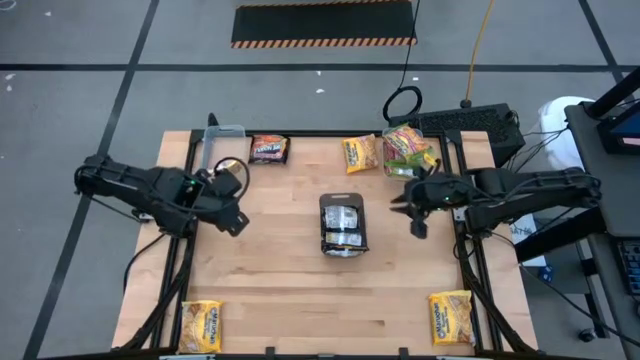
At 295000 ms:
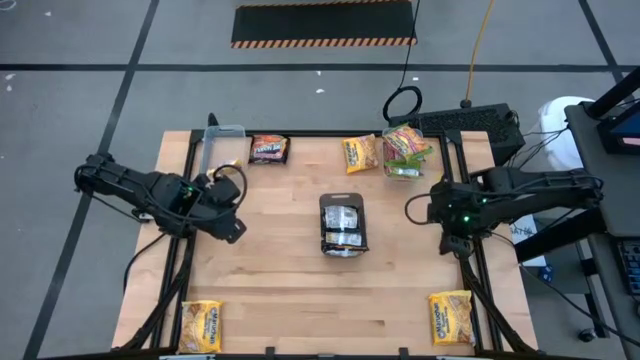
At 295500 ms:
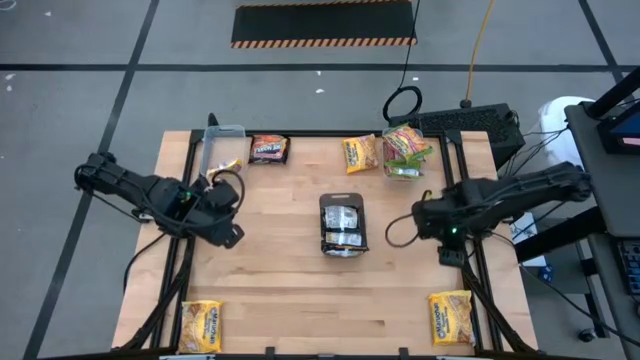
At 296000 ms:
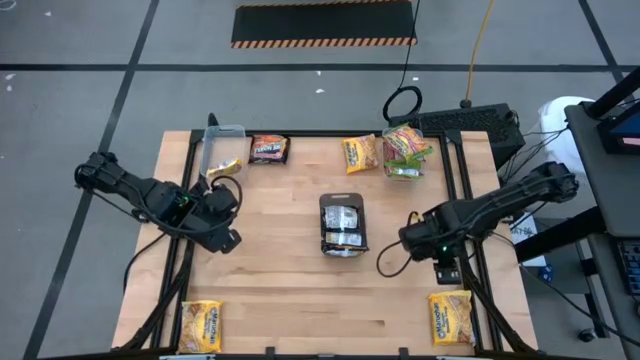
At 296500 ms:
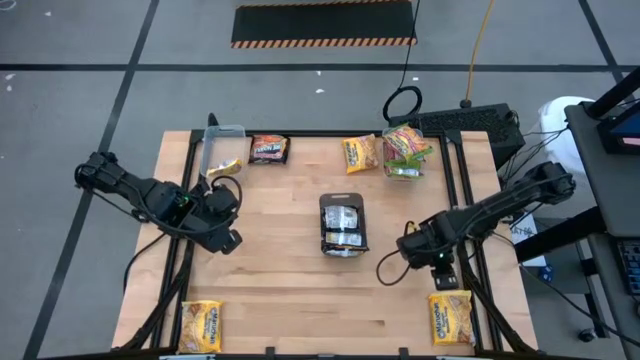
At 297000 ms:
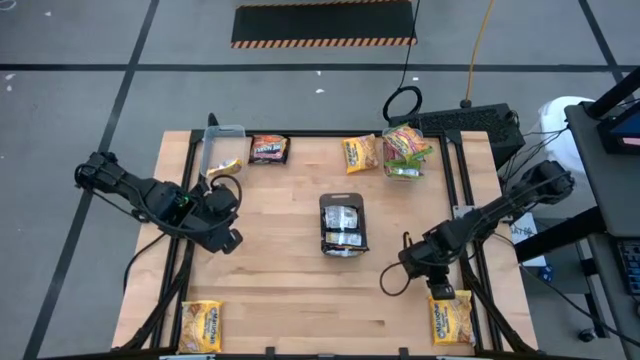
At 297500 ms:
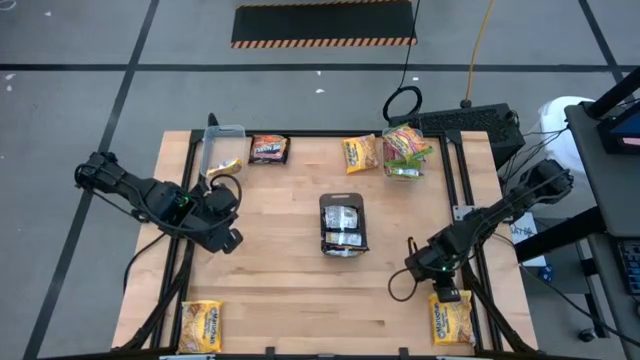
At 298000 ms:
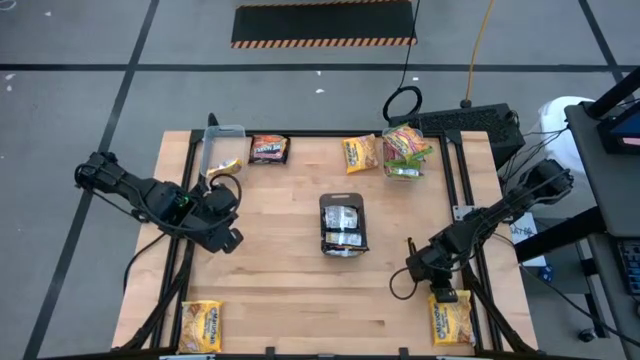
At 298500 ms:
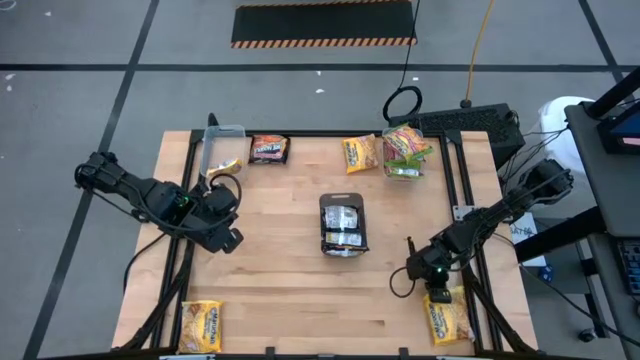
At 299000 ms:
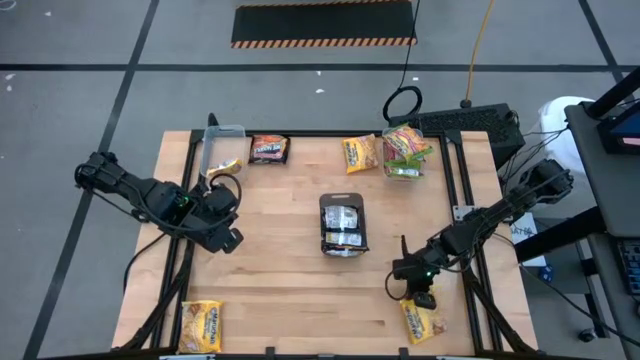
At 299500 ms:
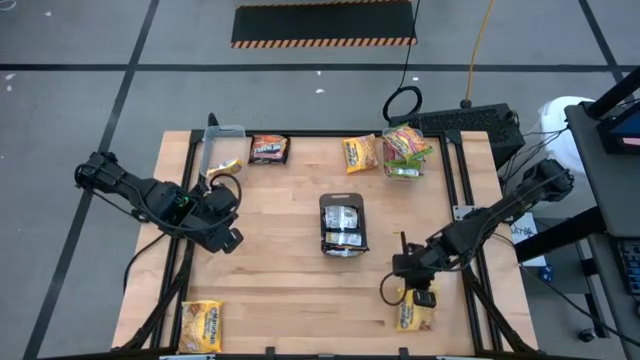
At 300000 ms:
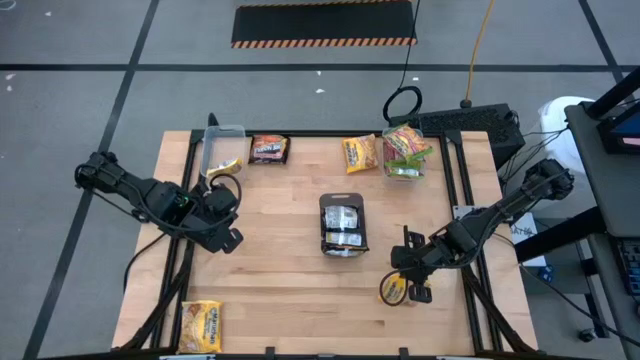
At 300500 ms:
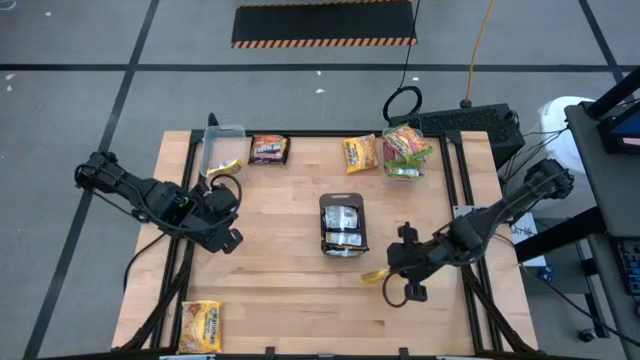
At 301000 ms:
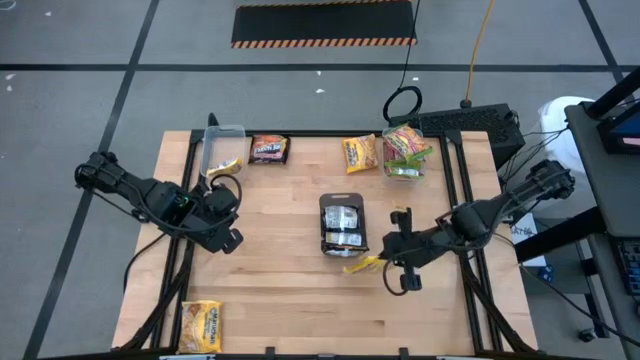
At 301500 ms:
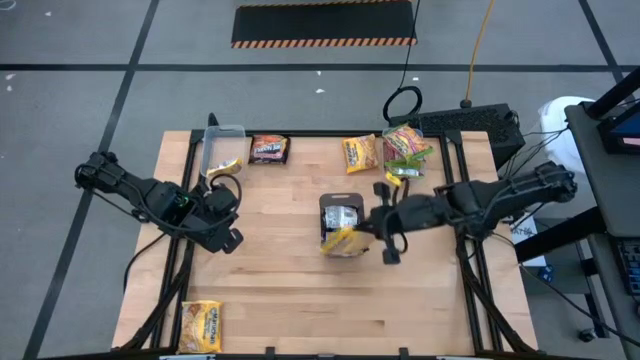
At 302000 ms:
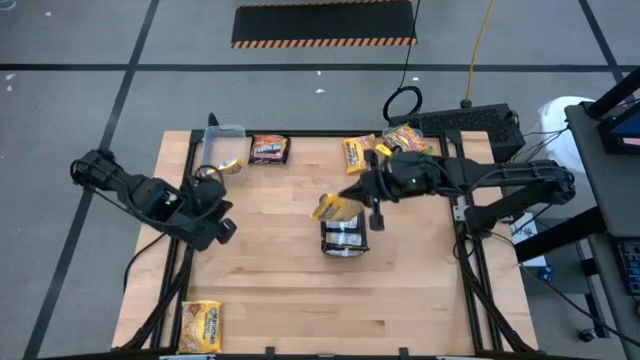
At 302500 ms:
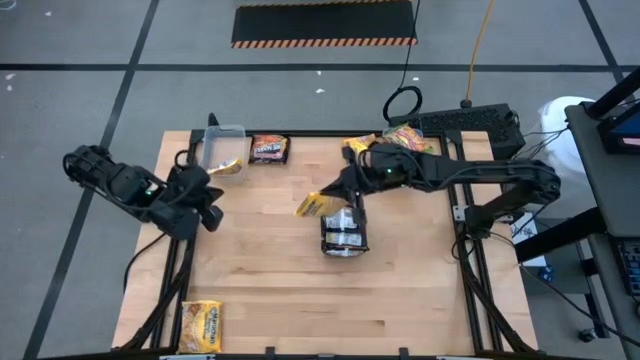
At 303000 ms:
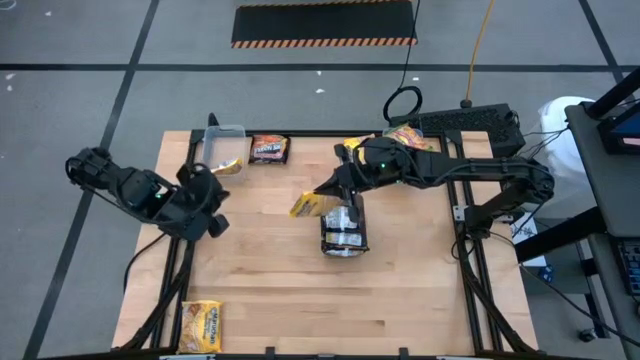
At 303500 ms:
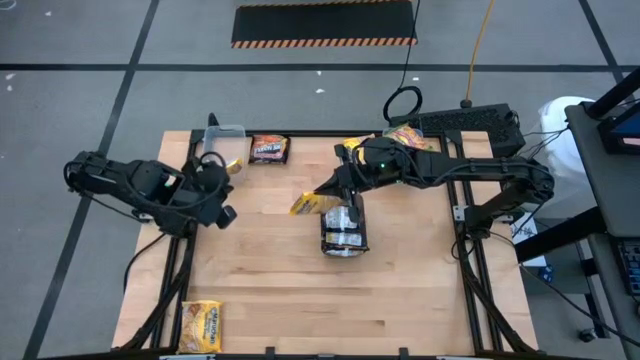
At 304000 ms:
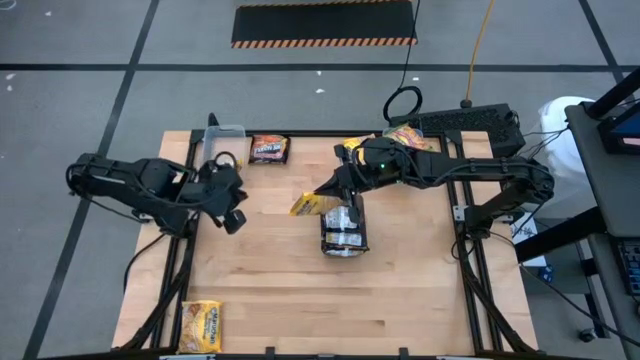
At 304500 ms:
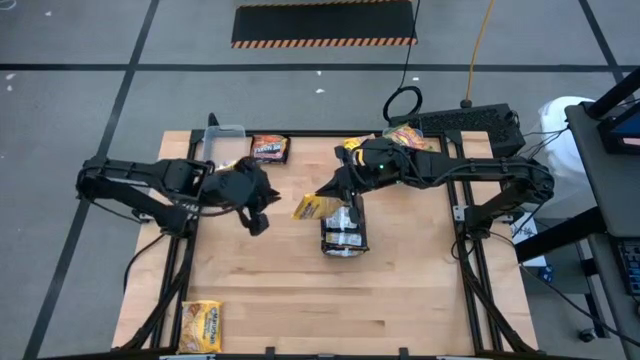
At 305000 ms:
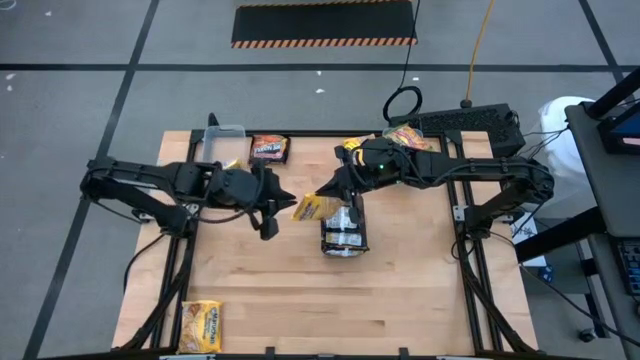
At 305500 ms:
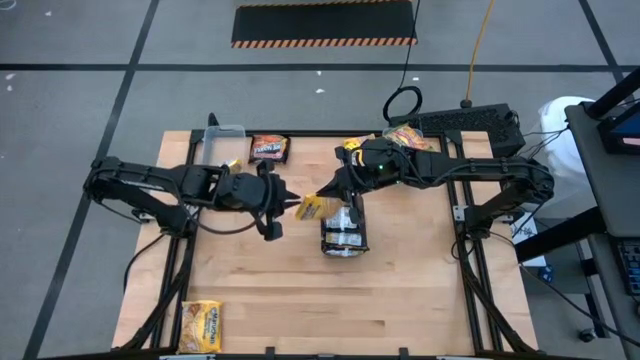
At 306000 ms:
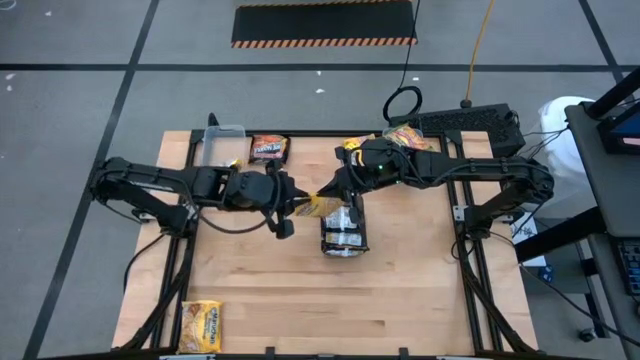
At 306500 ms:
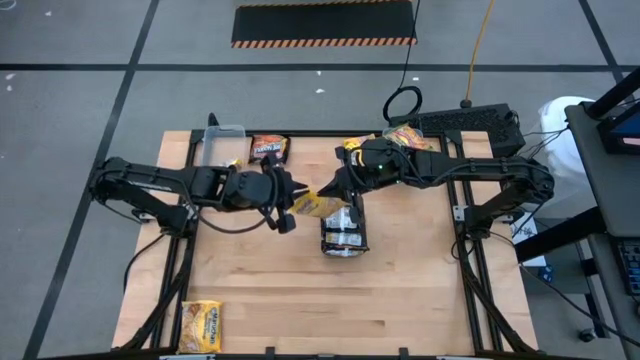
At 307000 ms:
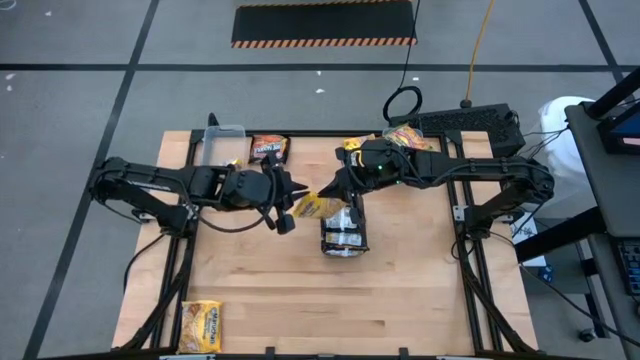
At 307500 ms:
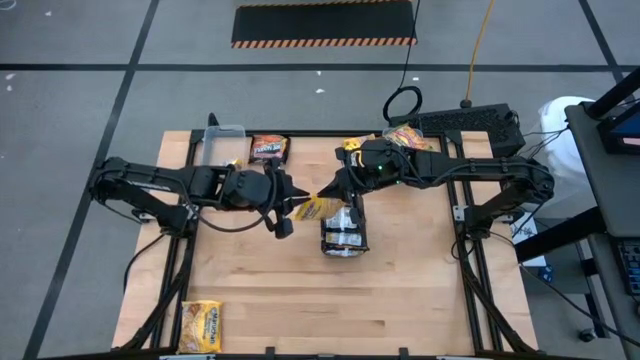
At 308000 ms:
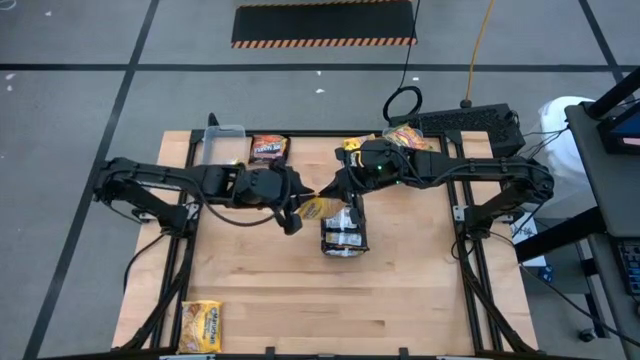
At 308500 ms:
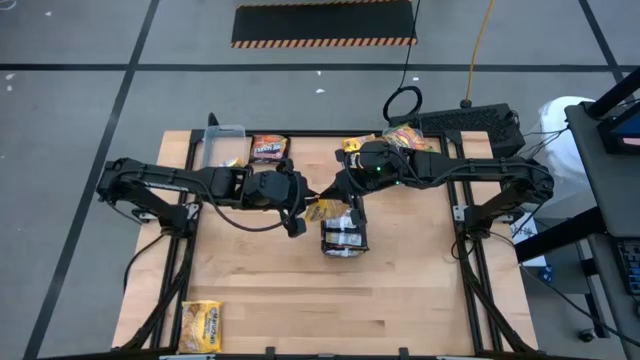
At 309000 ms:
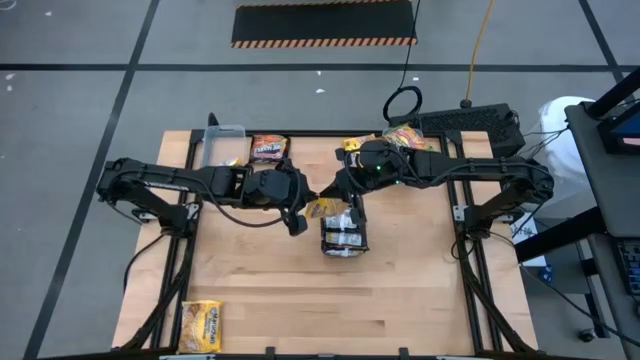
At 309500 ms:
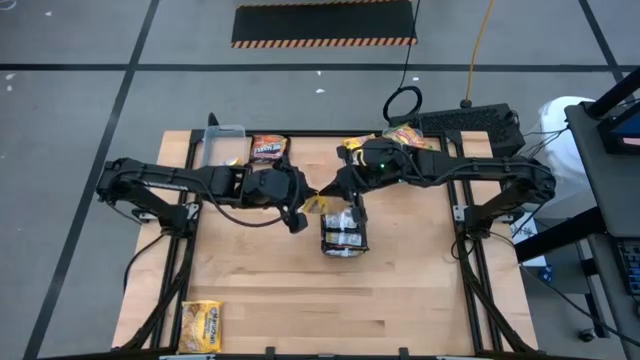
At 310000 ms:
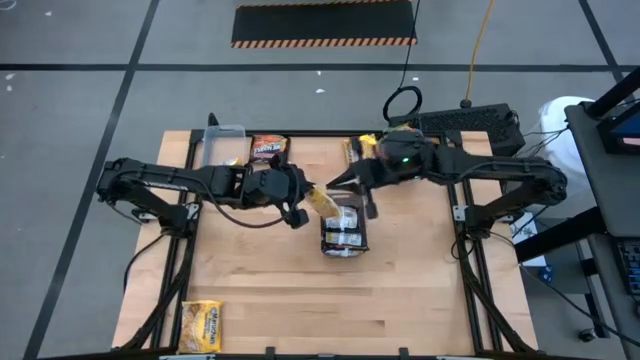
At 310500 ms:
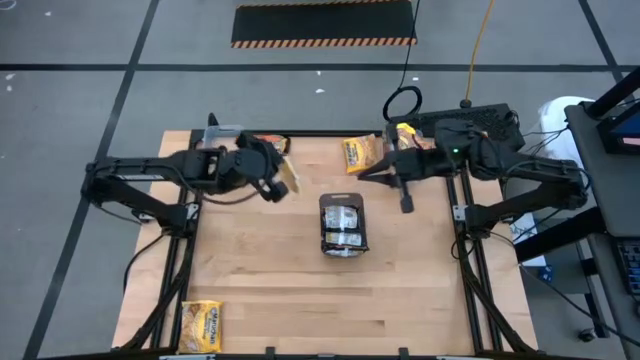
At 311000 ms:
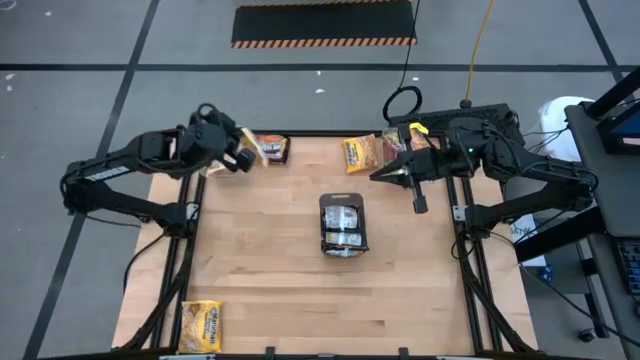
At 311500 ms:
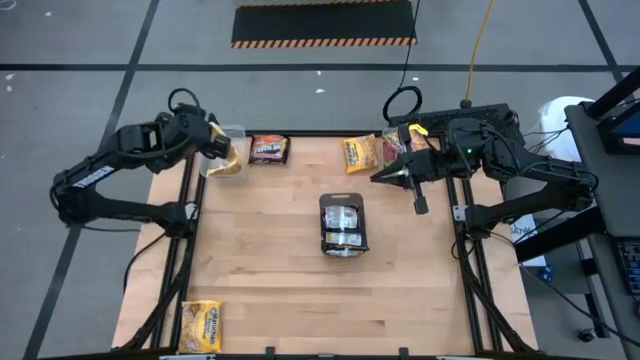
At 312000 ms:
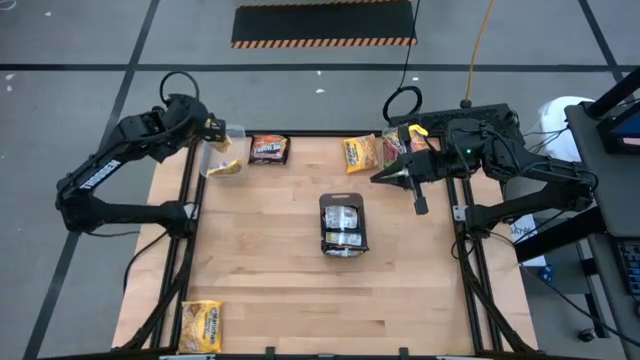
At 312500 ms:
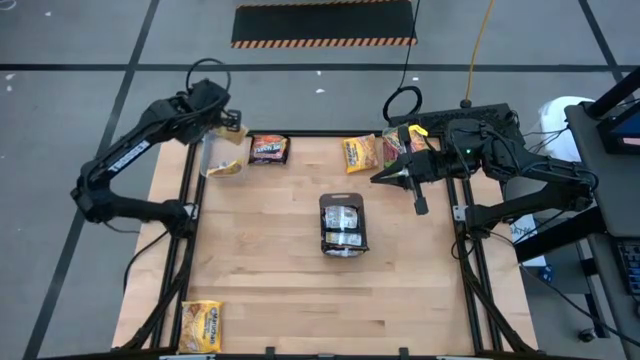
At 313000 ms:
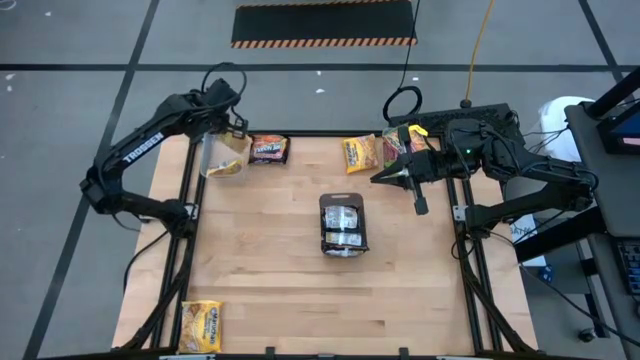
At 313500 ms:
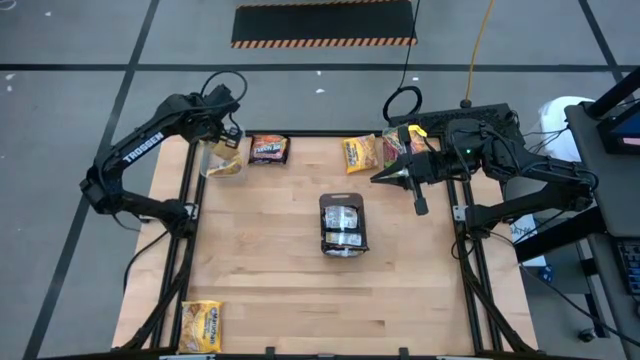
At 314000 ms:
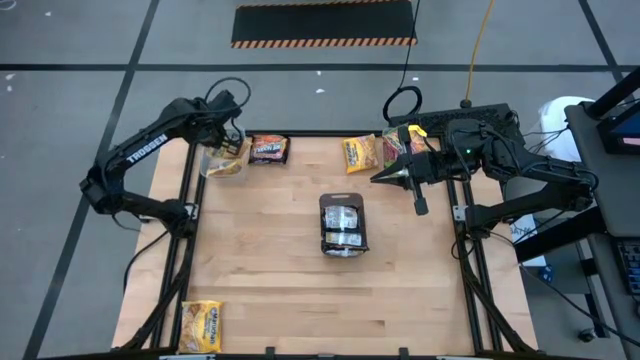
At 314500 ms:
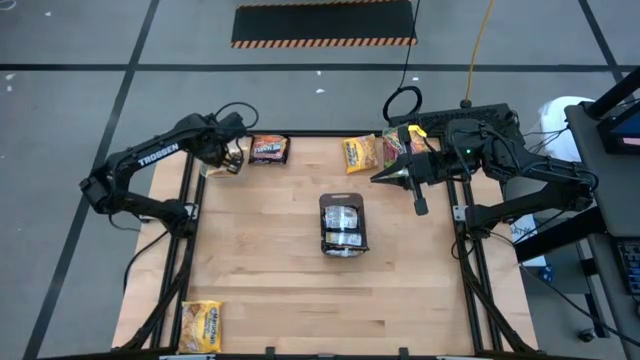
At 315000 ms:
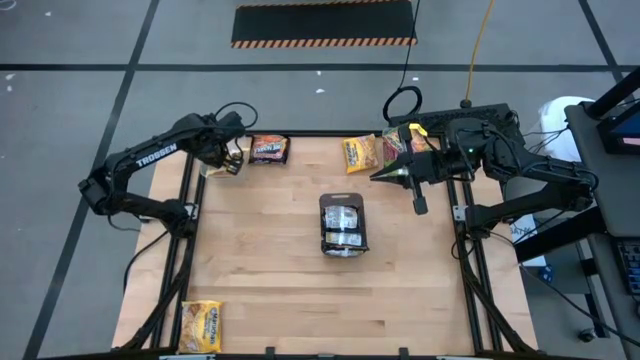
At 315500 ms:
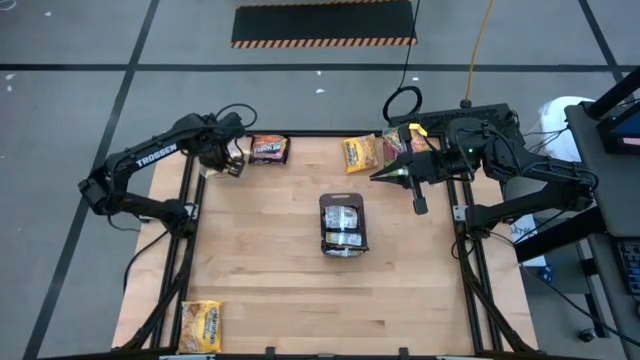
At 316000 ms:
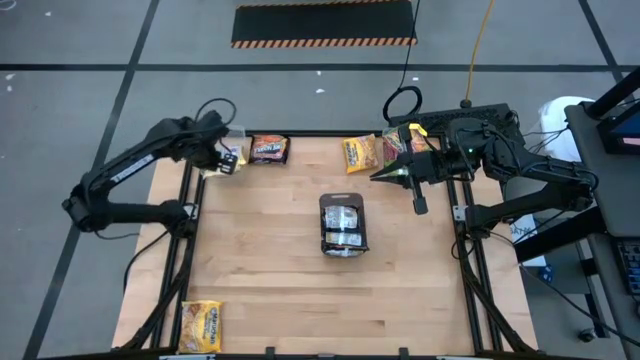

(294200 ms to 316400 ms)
Task: Sort Maruchan noodles
Put the bottom right yellow noodle pack into the left transparent bin

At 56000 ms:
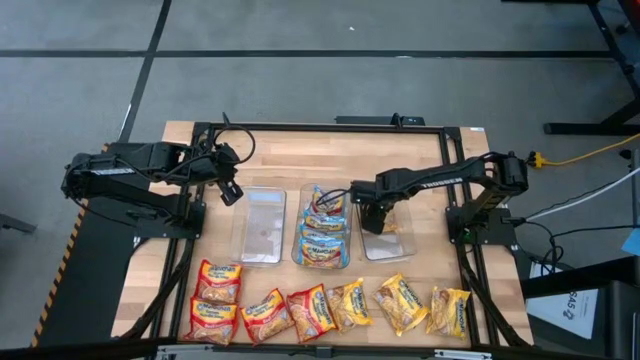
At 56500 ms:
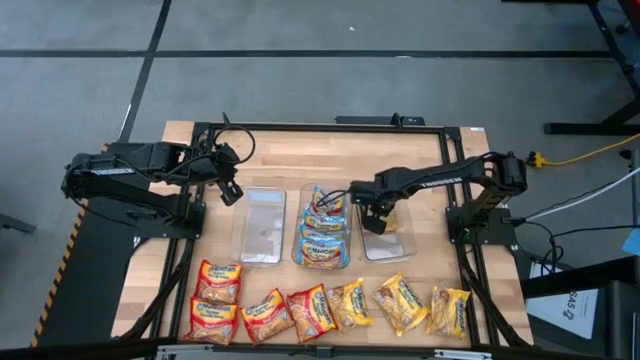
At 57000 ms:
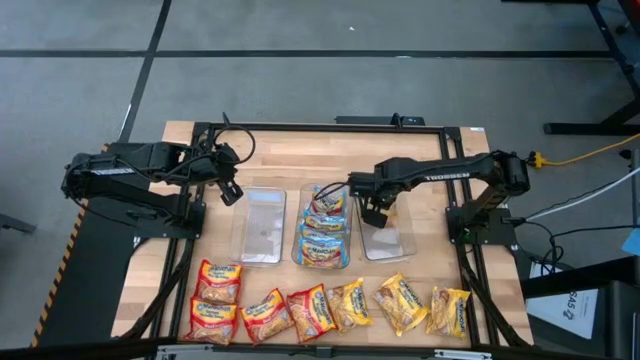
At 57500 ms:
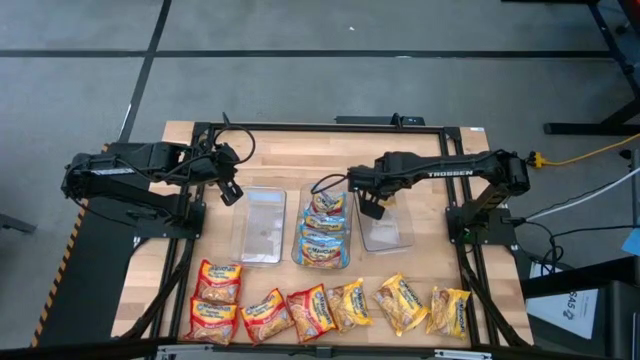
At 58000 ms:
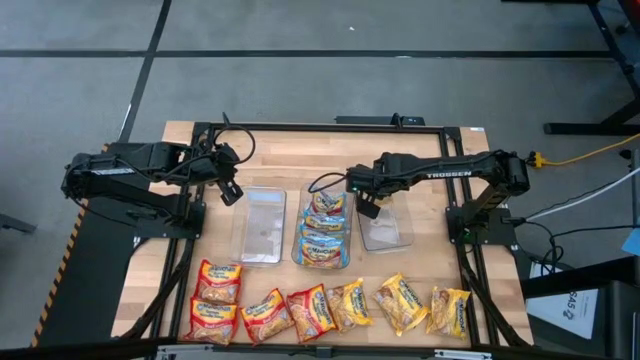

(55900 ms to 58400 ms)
Task: Sort Maruchan noodles
Put the yellow noodle pack into the right transparent bin
